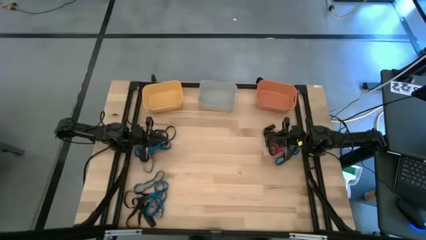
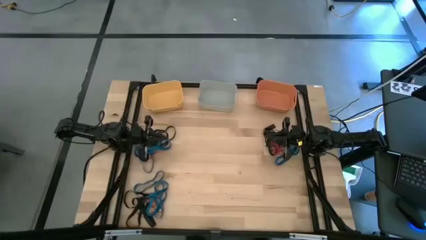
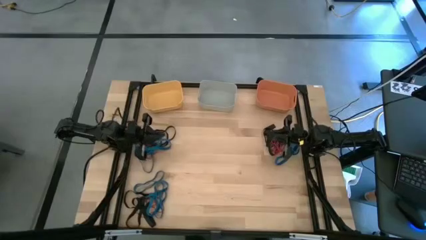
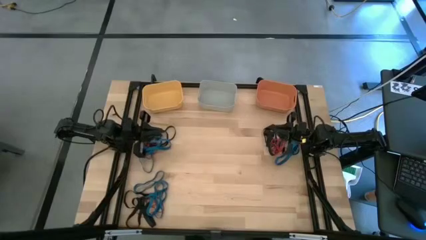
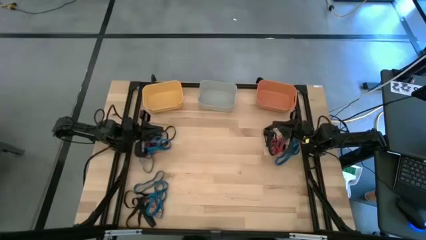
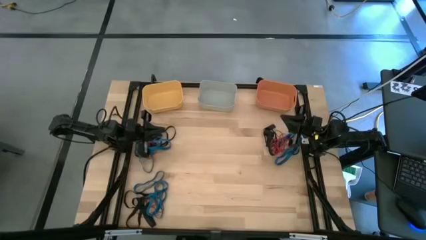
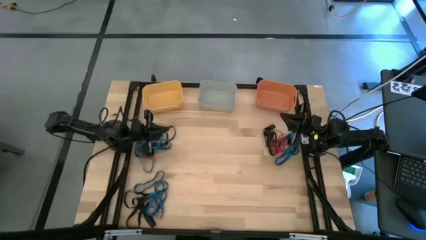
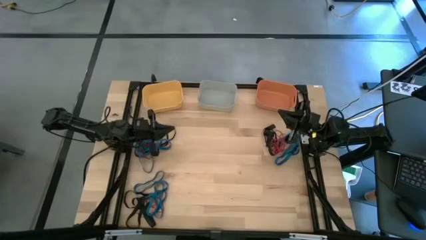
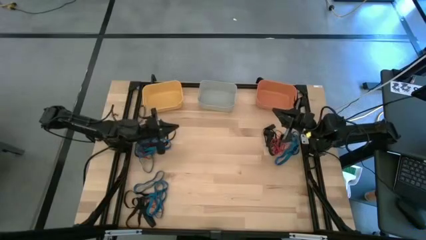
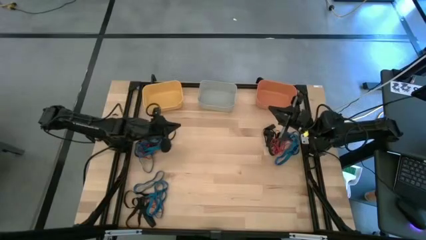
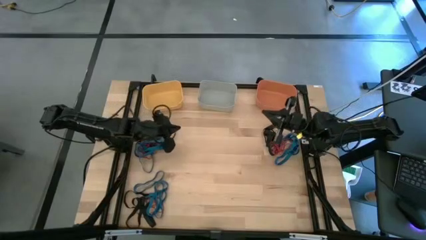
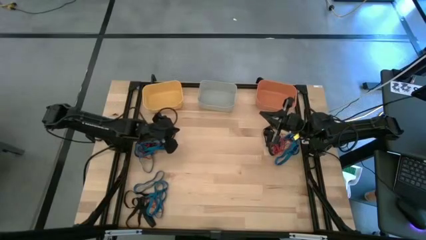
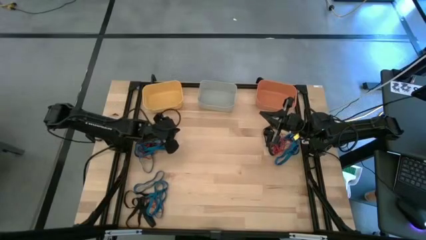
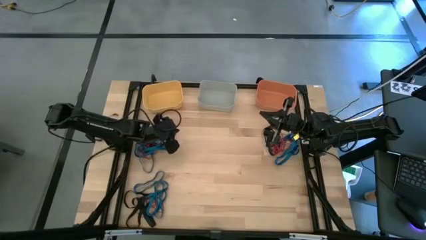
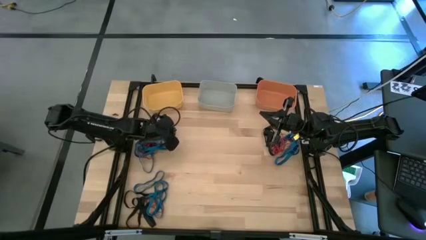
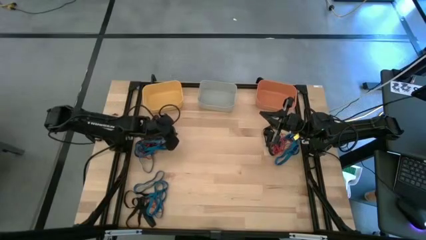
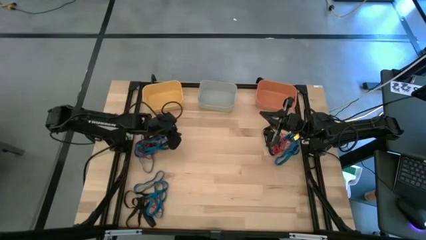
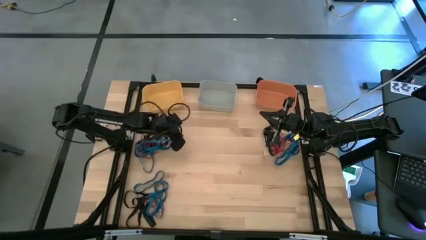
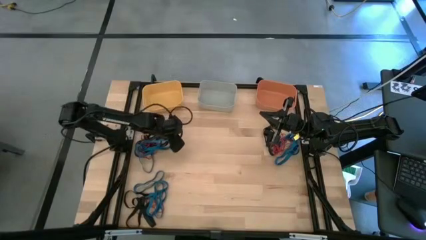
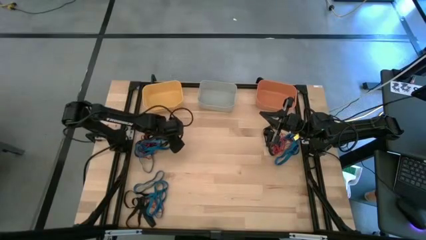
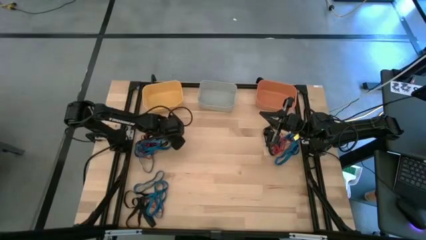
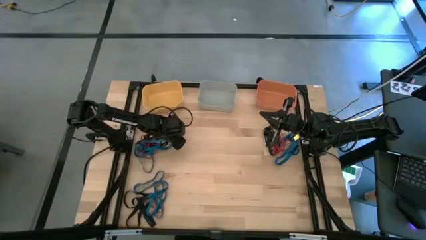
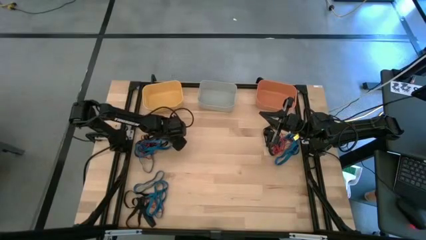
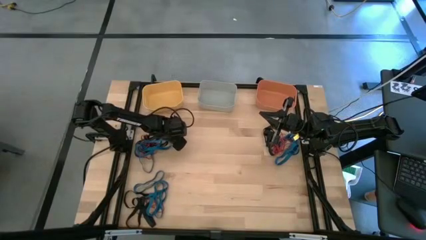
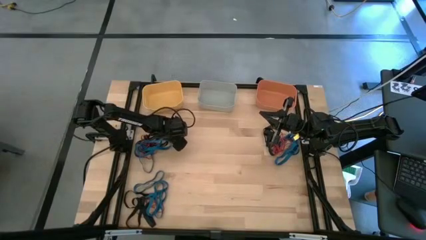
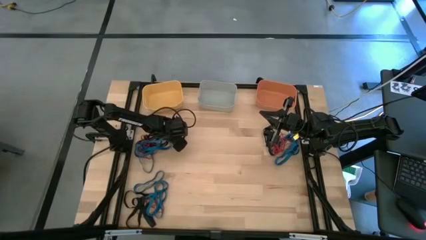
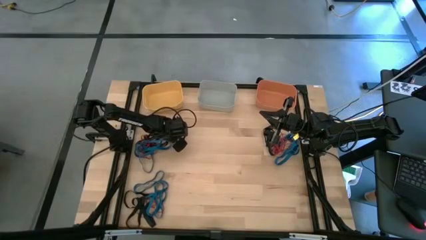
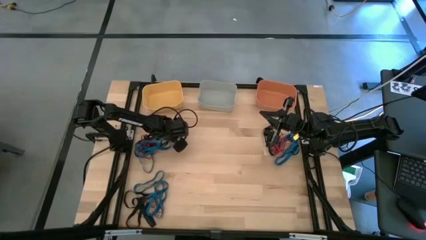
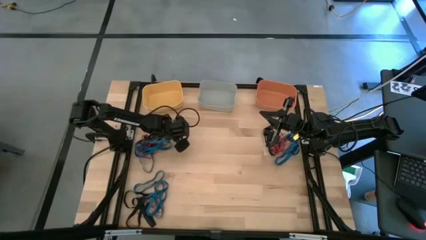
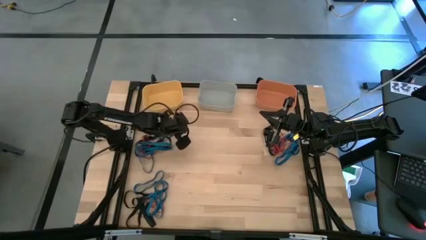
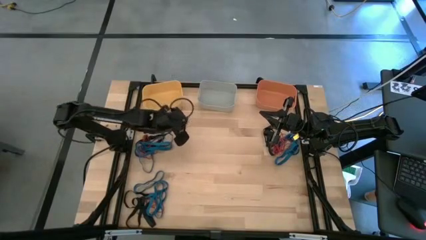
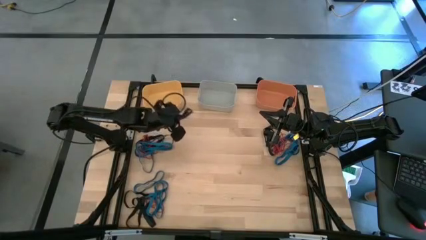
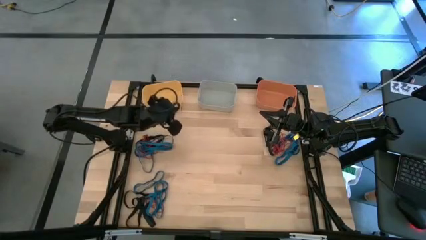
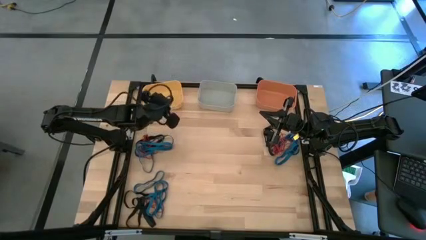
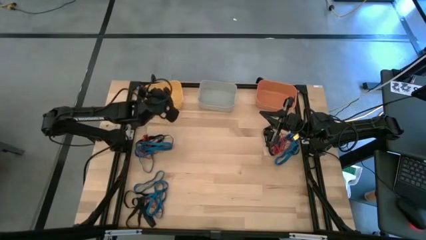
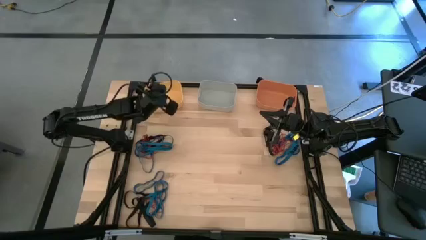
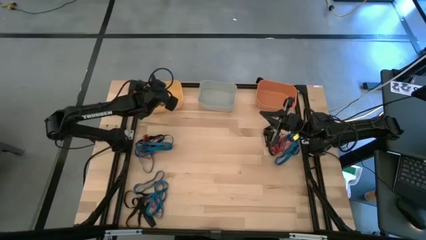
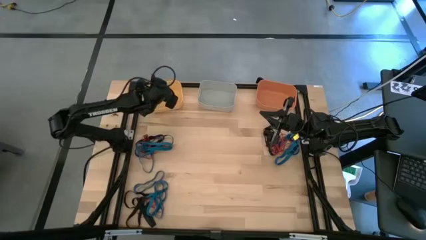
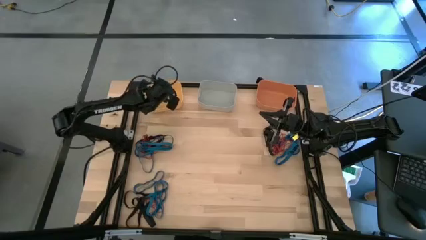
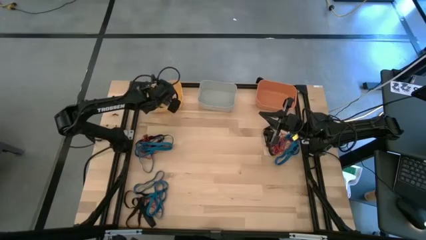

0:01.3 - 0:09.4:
Task: Sort rubber bands into baskets
Put the black rubber band into the yellow bin

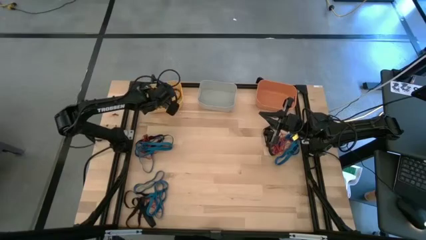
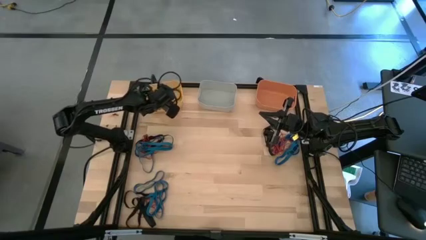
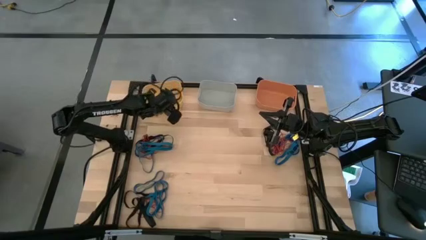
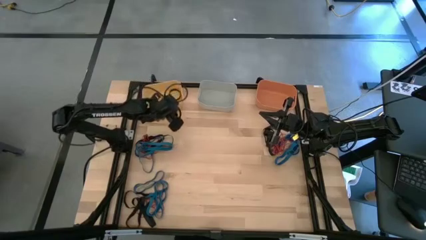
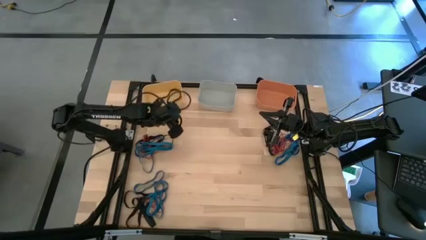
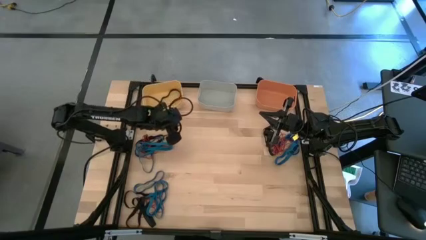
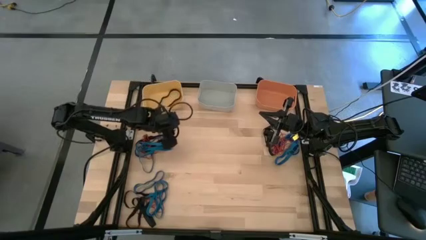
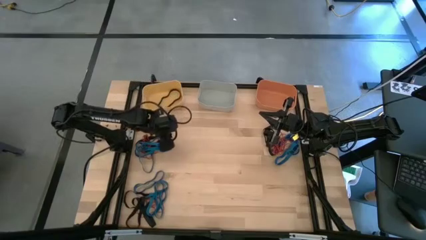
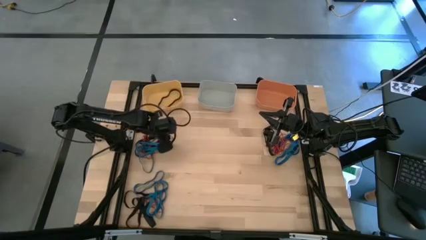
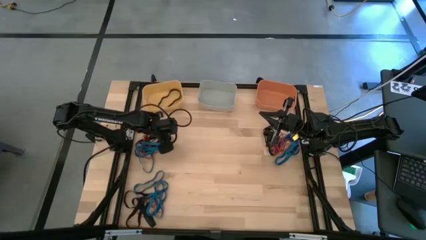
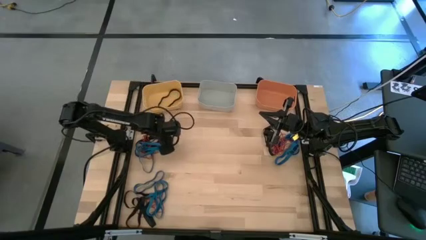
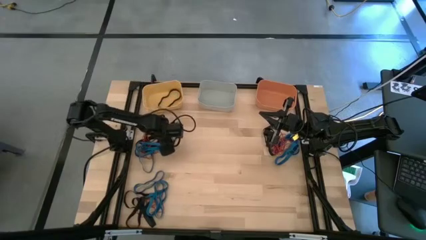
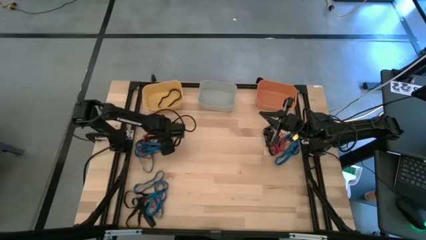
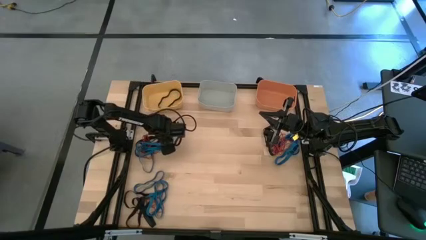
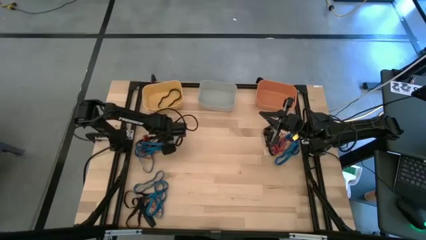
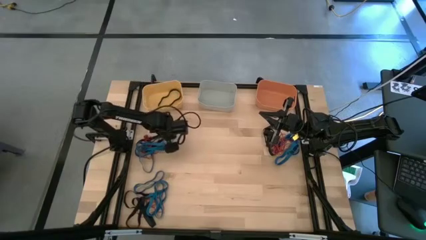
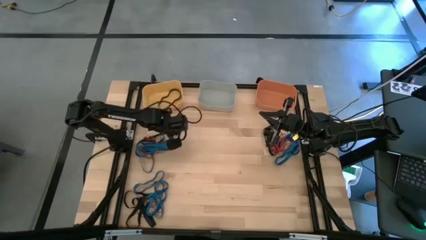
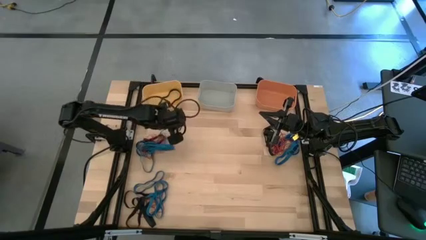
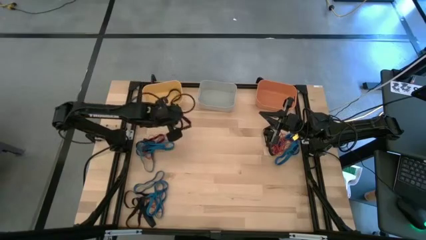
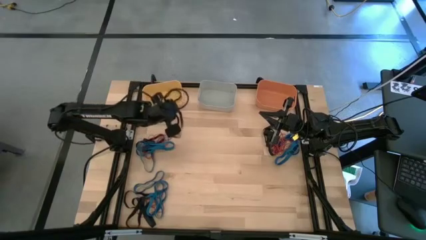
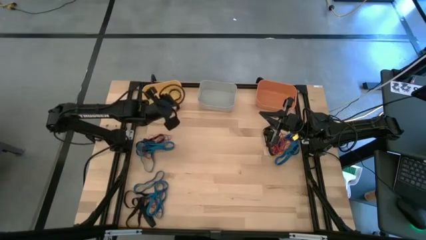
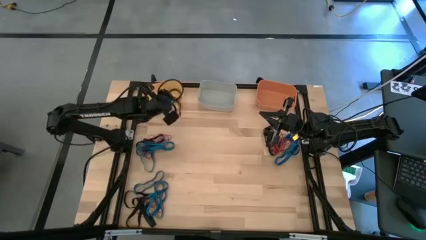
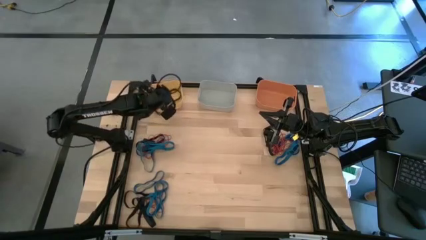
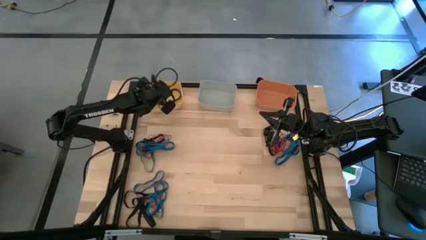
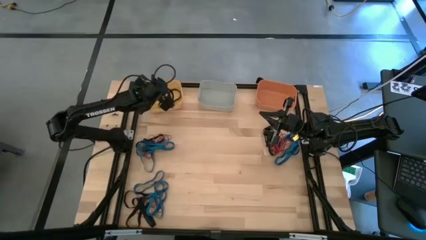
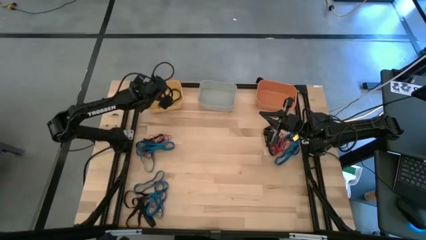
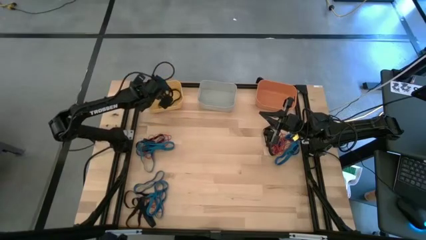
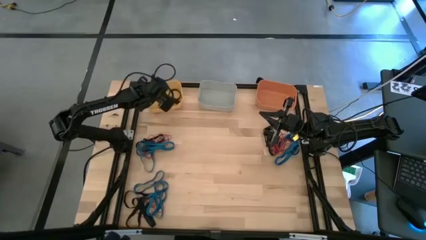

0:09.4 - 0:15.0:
Put the black rubber band into the yellow bin

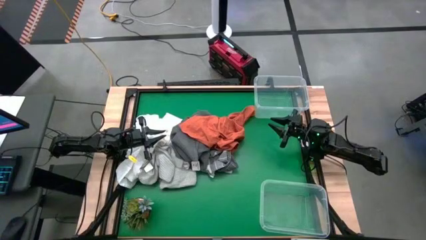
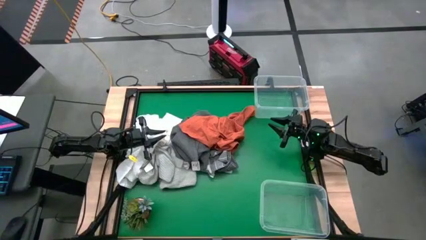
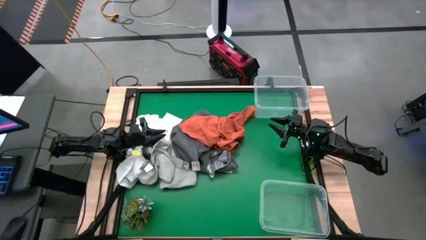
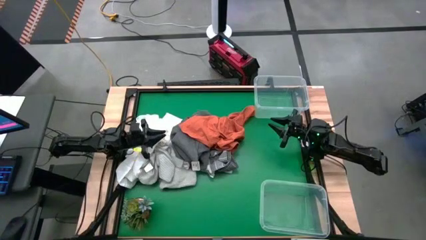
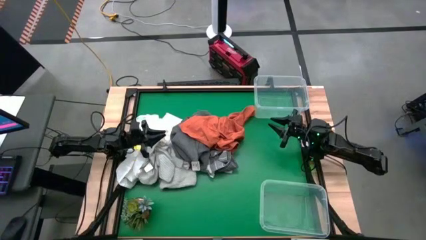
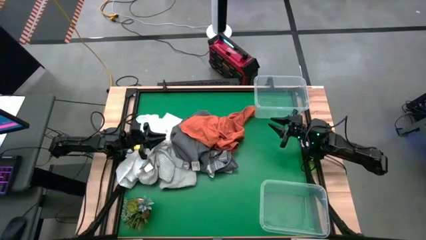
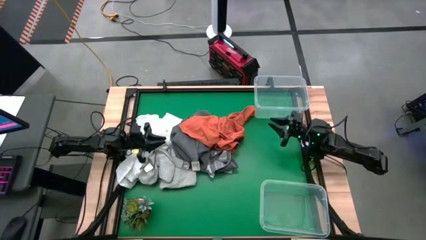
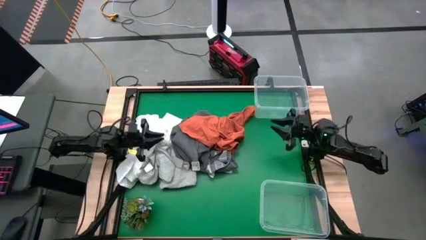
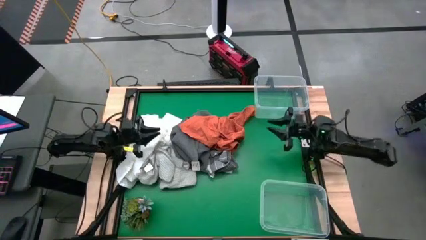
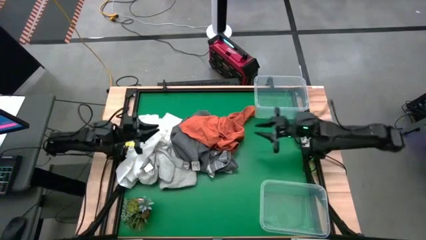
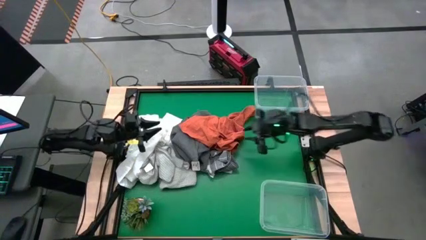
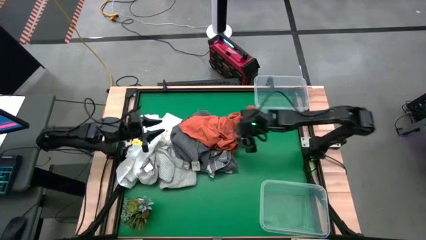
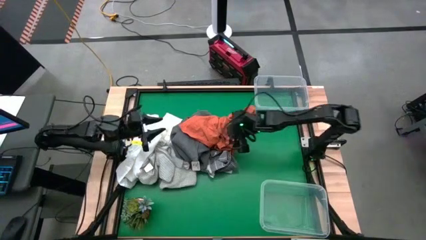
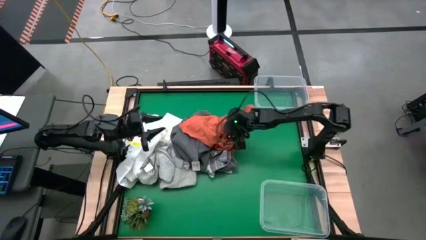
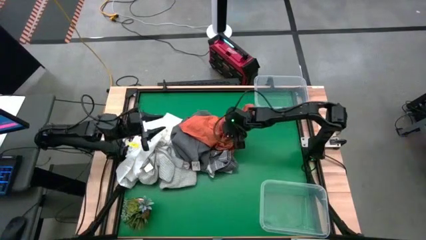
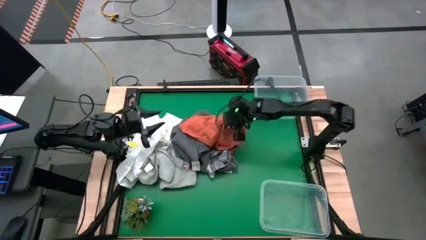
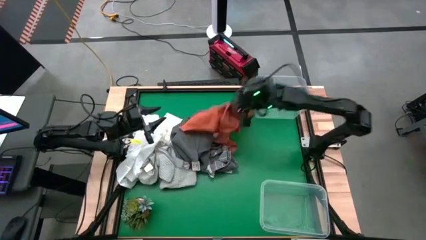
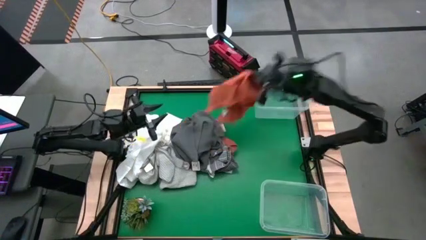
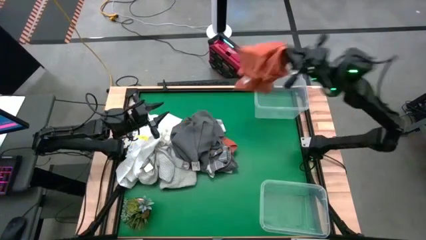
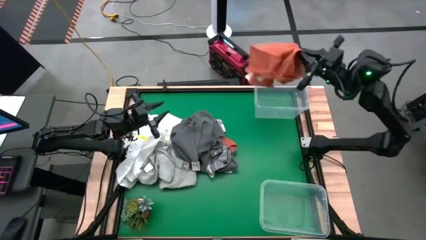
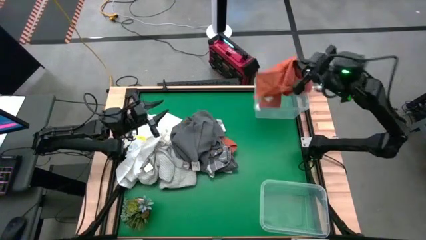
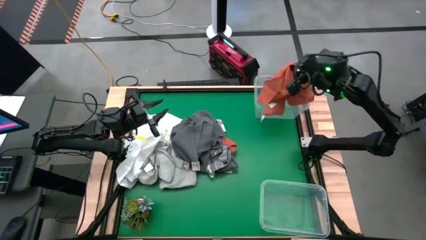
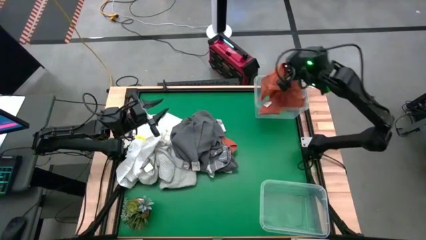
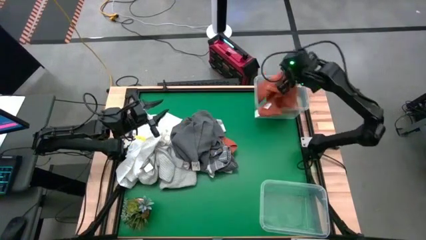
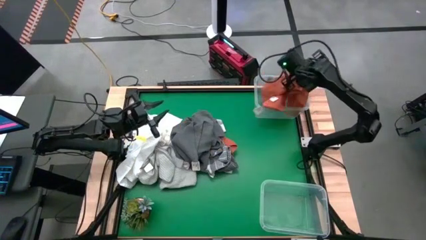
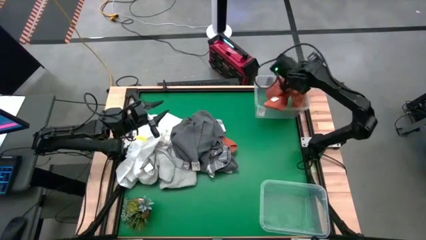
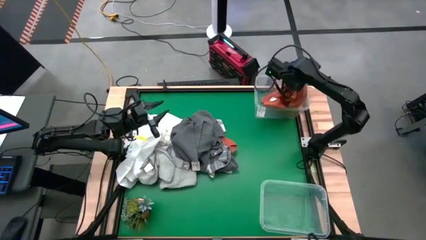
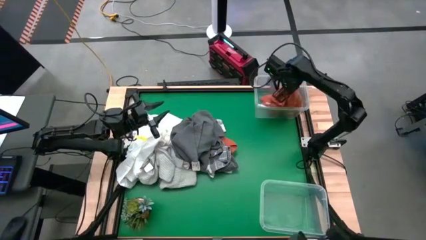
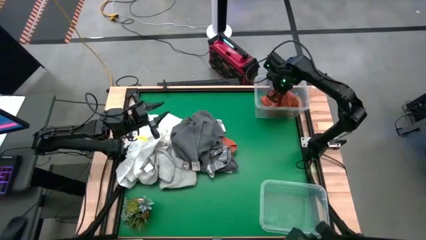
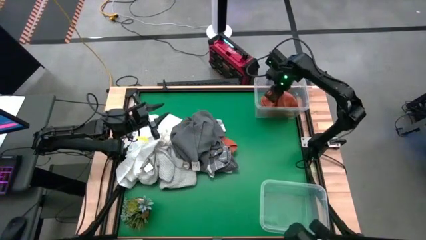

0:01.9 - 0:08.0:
Task: Sort towels by color in basket
Put the orange towel into the top transparent bin
